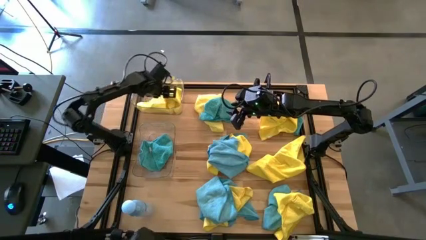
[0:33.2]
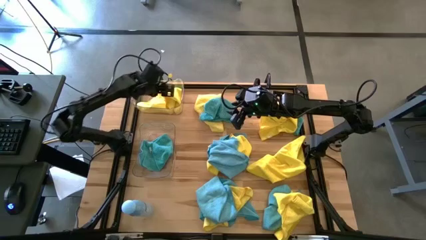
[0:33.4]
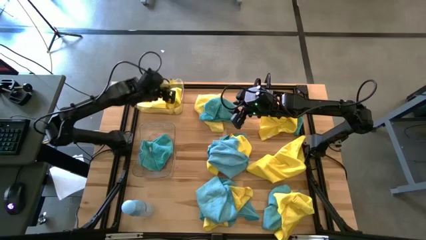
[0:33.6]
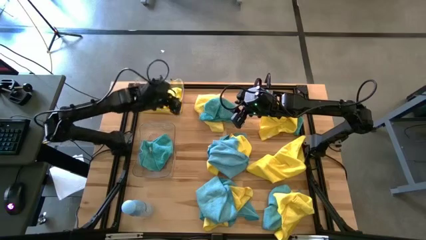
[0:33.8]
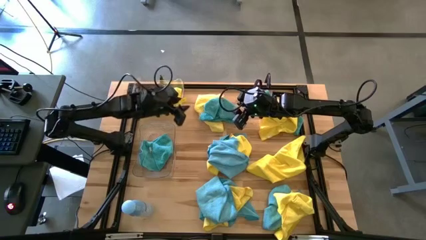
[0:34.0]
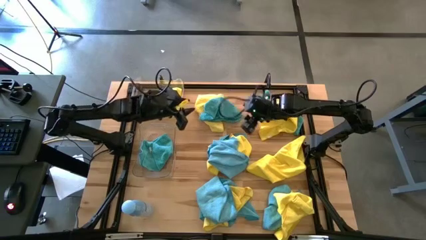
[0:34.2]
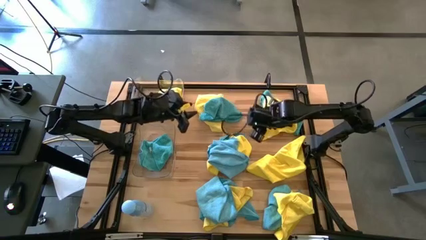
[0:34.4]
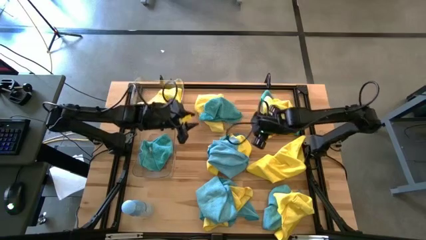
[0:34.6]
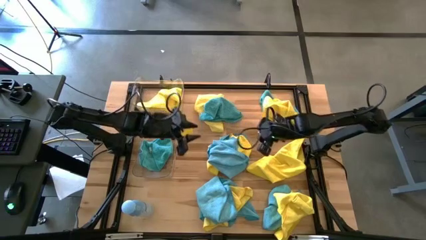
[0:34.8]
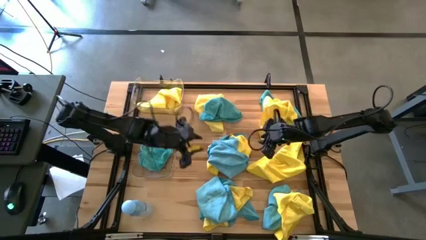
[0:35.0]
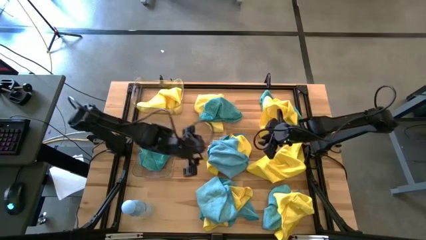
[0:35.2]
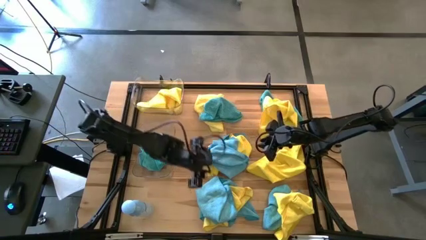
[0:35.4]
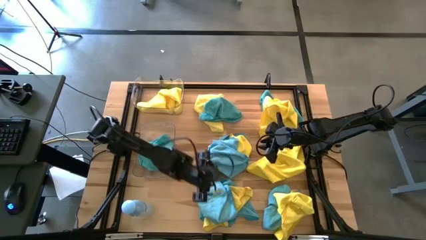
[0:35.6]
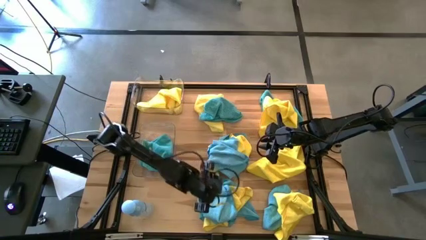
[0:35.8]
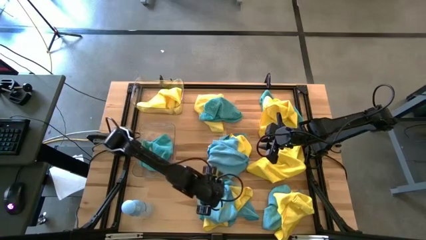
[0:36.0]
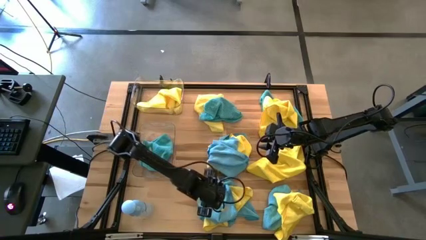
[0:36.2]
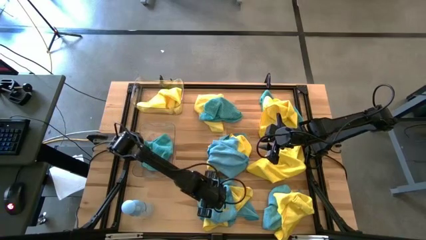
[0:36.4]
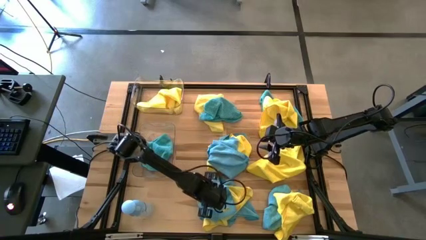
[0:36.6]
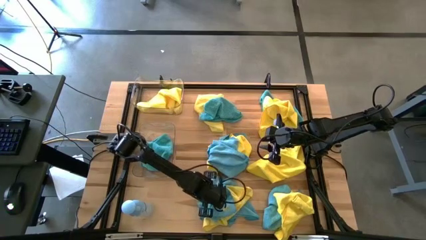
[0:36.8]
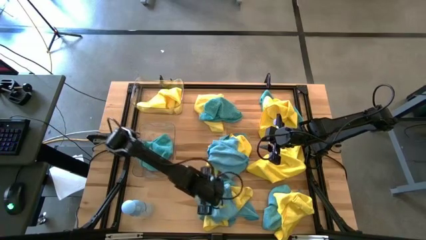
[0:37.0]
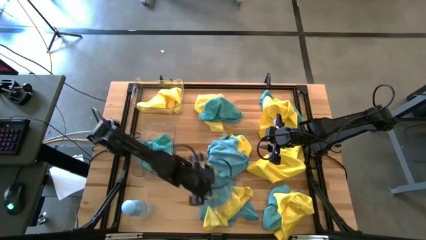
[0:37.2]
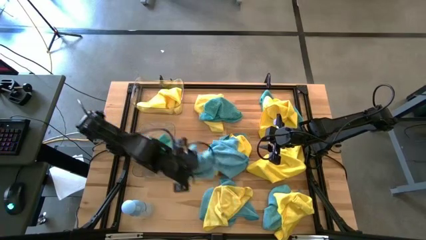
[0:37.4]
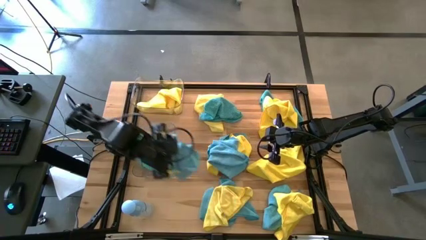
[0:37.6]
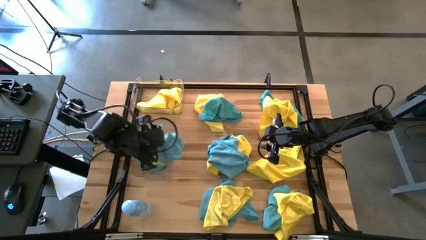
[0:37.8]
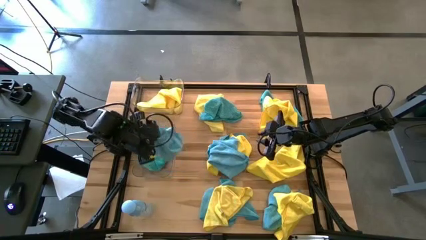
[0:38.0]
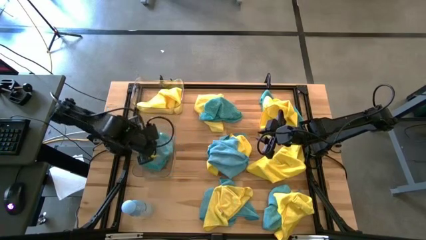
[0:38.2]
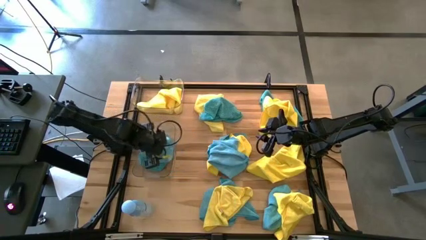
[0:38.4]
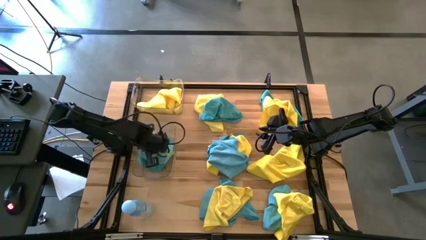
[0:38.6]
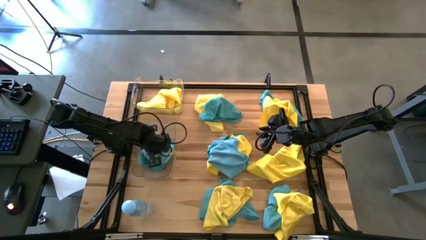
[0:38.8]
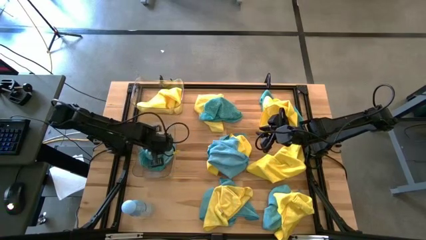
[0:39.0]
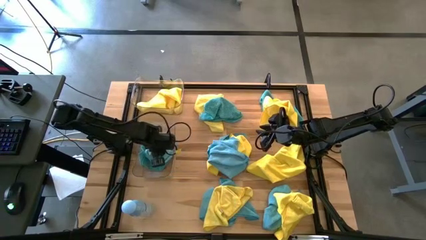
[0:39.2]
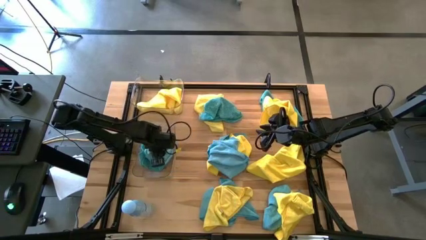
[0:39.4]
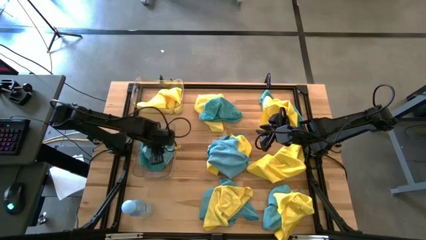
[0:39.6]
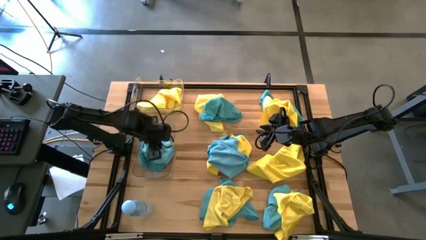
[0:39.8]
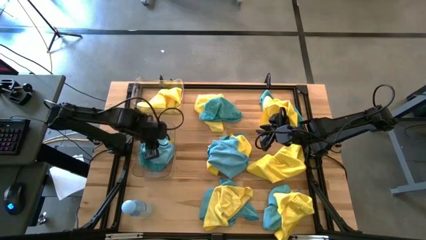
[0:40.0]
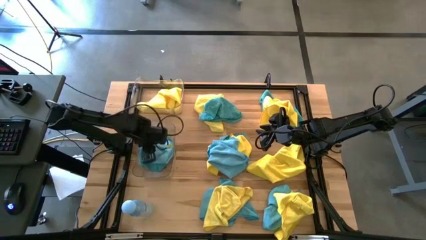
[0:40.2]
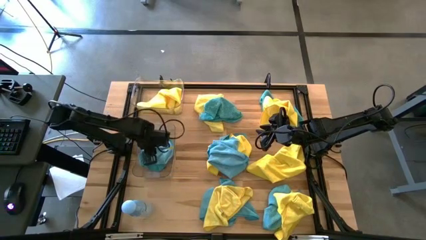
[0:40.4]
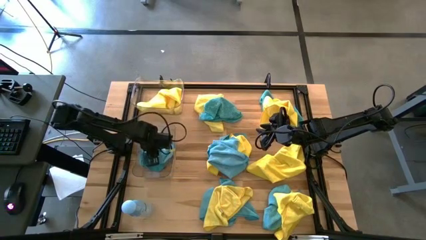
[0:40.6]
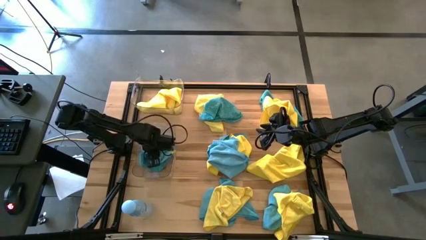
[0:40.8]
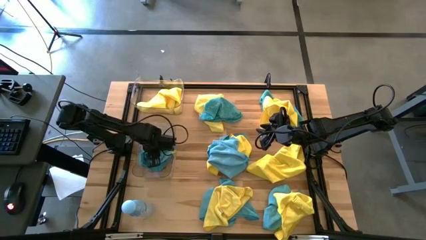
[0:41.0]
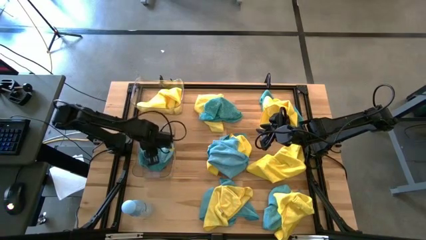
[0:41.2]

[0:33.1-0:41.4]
Task: Sort microfiber towel by color & place in baskets
Put the blue microfiber cloth into the bottom transparent bin

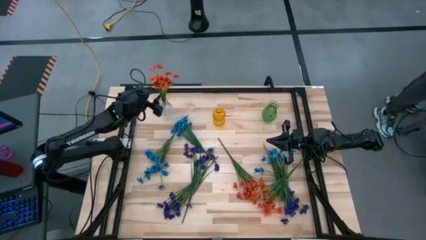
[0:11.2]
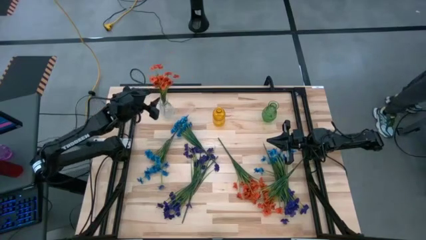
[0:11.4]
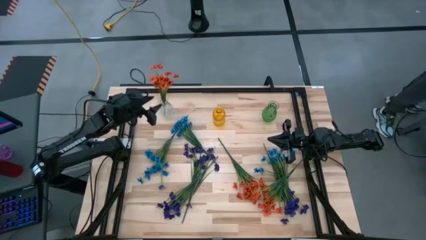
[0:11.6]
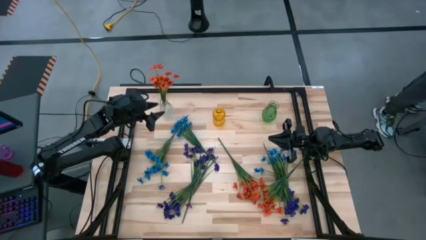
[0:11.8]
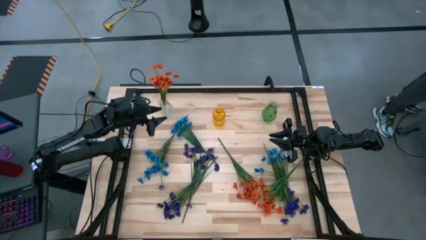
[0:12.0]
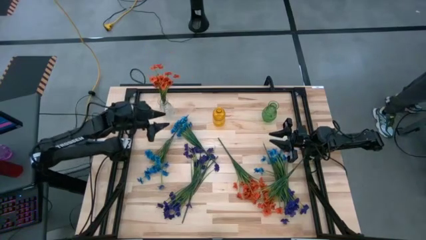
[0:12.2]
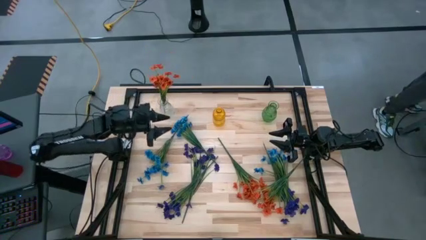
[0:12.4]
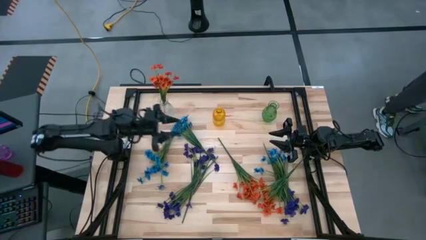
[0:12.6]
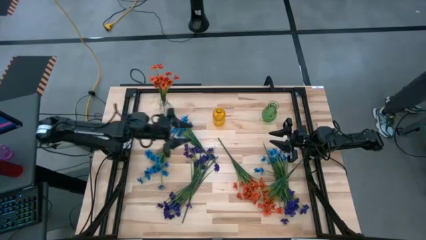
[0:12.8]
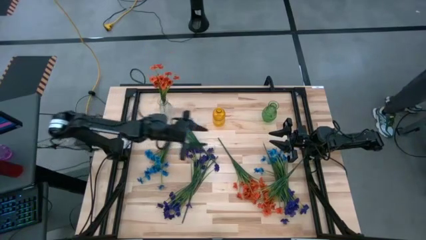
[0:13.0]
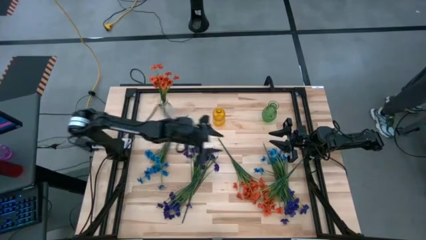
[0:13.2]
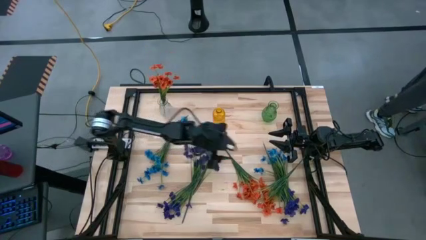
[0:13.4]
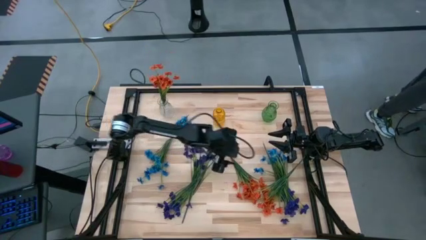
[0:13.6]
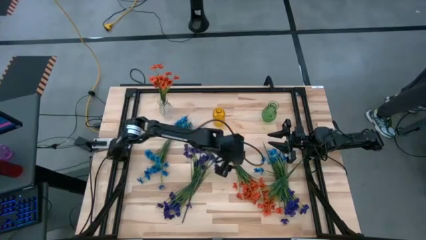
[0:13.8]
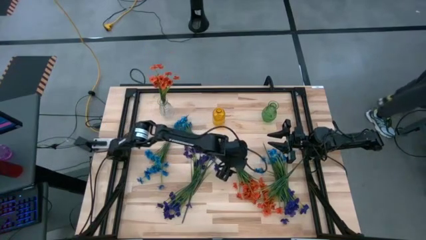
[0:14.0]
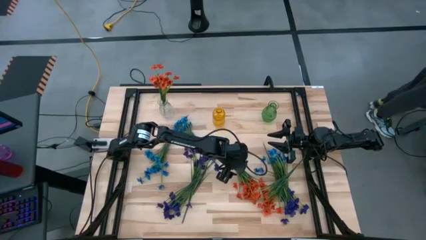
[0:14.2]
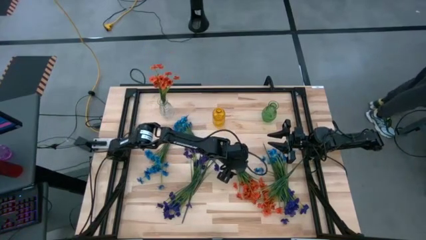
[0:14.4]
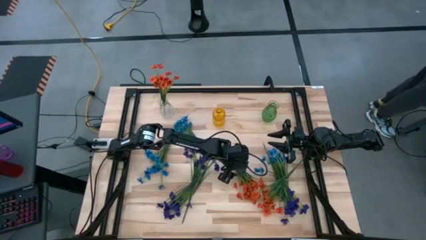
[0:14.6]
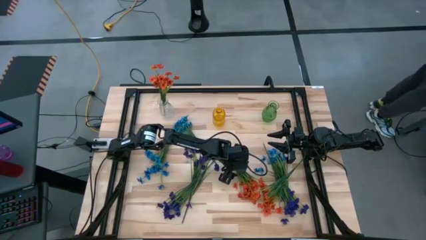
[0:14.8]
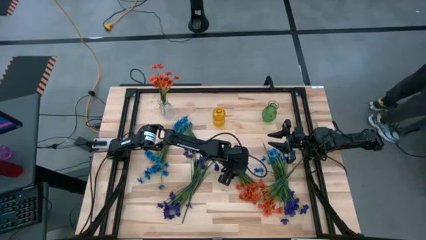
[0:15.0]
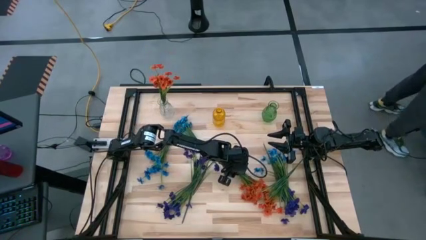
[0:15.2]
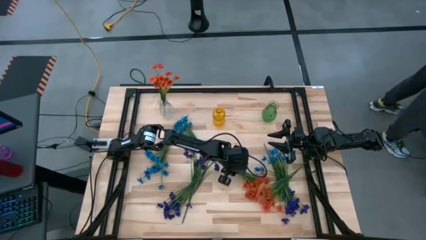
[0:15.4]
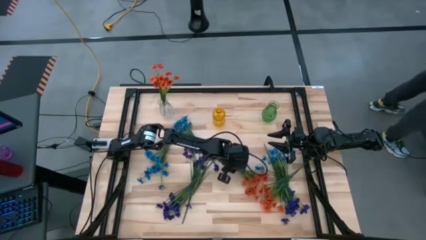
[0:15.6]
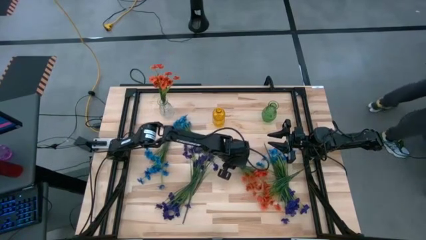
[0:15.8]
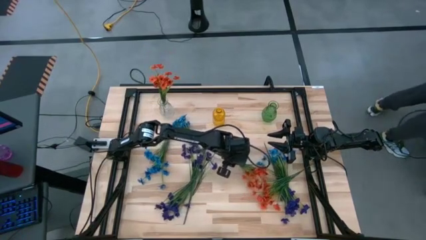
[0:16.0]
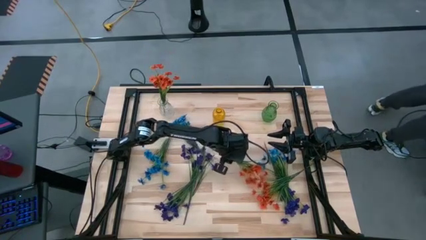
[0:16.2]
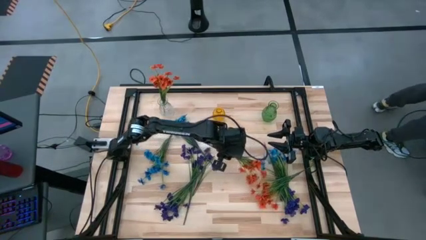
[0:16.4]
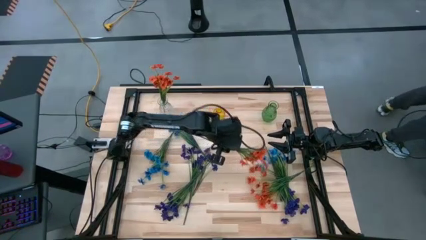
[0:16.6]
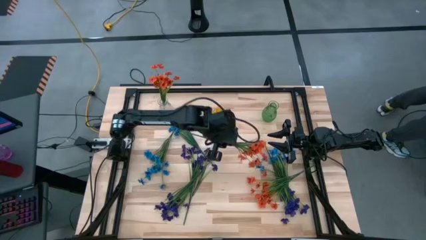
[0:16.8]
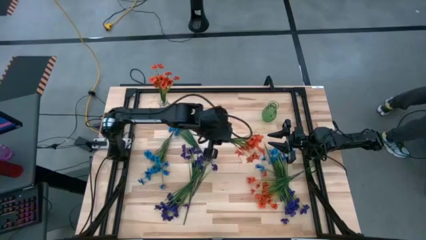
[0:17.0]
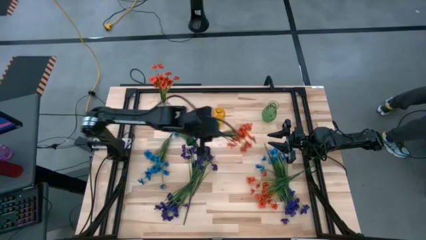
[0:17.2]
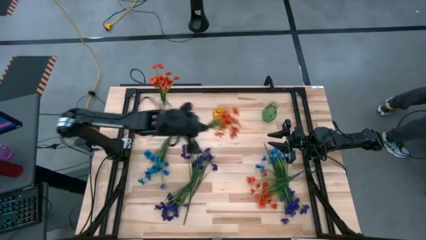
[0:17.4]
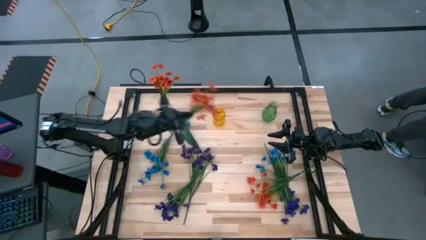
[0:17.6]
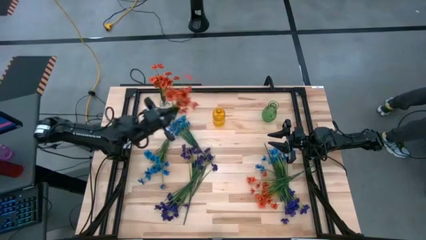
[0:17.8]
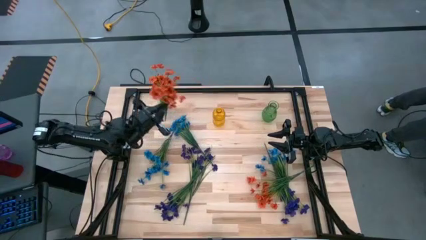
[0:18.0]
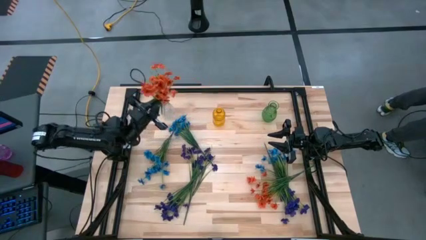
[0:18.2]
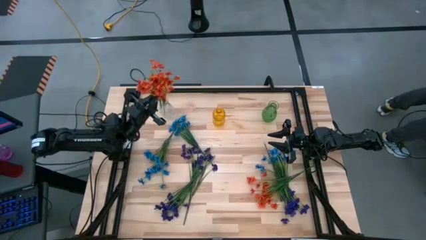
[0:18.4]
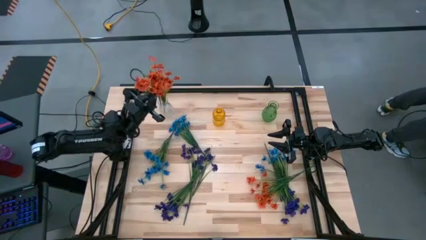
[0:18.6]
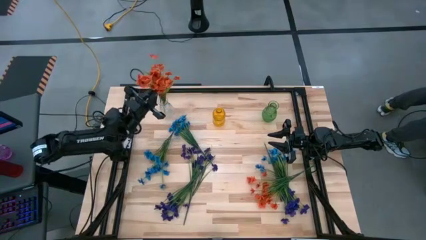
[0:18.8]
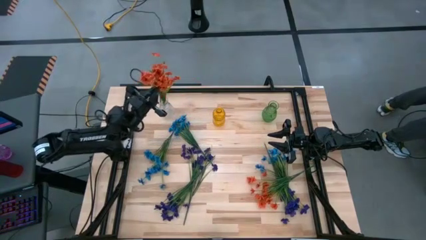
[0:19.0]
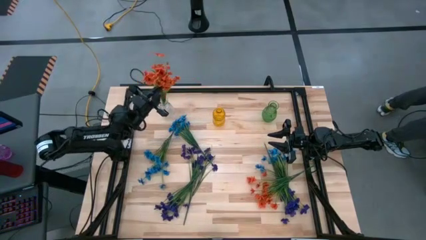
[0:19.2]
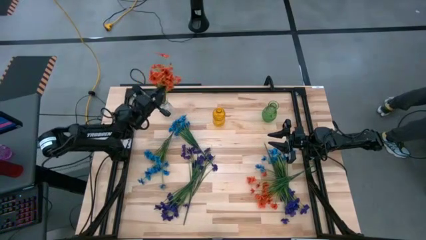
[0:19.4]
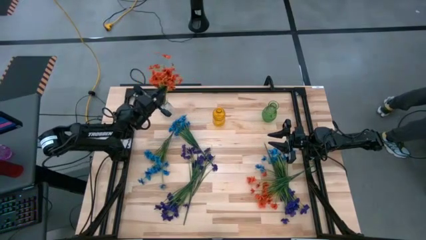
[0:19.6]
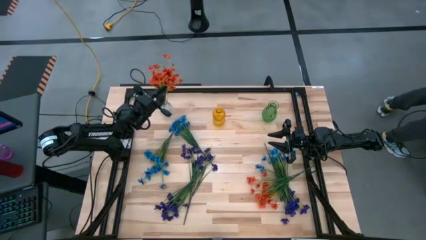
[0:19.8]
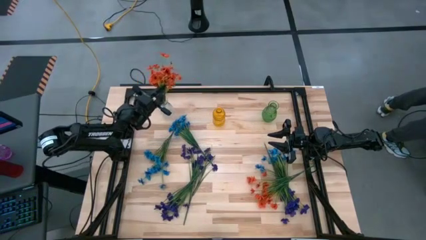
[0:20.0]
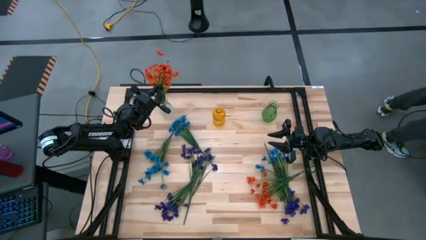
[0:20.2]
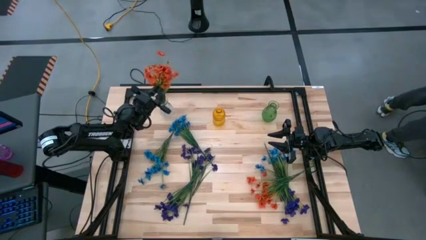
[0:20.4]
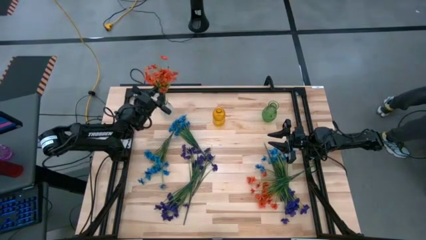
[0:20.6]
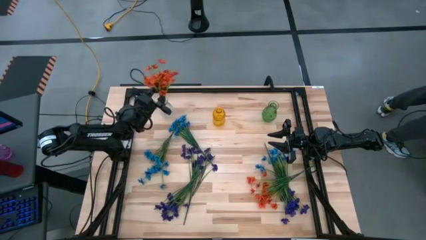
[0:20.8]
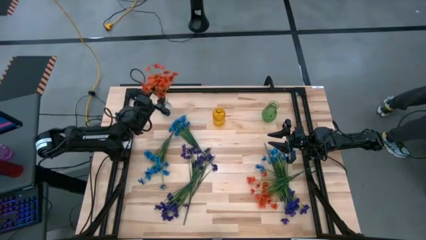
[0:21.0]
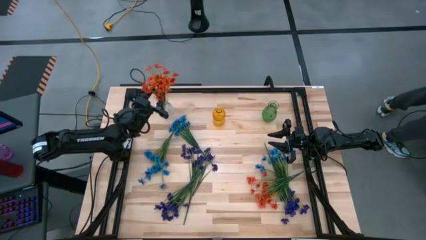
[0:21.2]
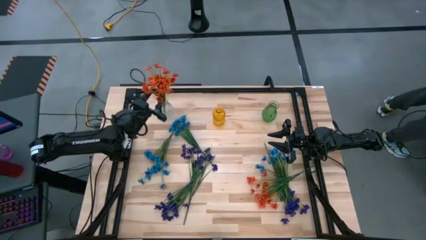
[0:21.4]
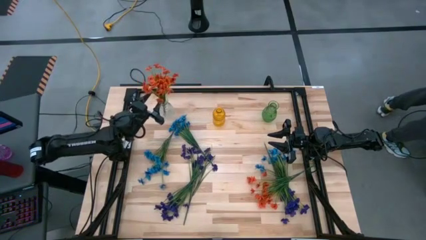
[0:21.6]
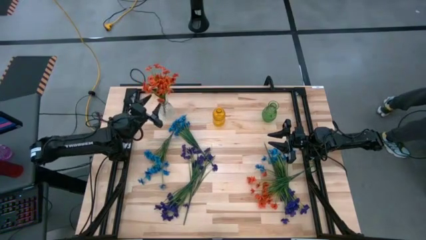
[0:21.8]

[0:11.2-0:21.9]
Task: Sort flowers into vase by color
Put the left orange flower into the transparent vase
